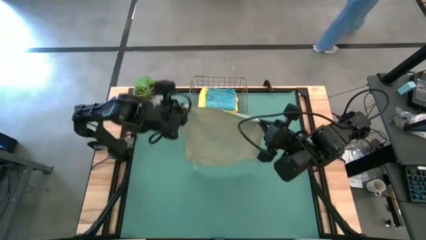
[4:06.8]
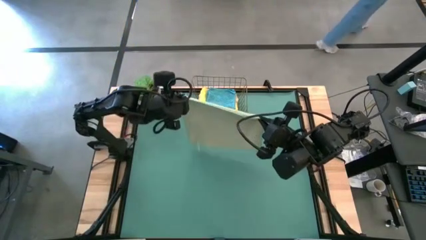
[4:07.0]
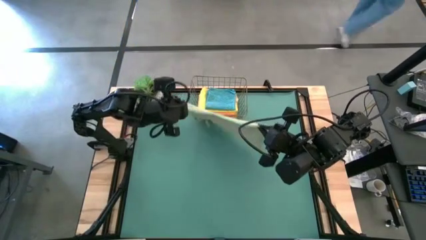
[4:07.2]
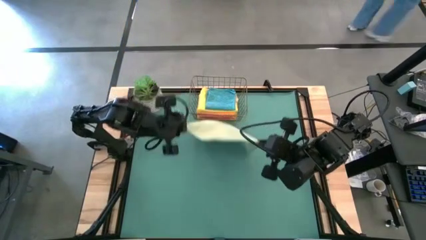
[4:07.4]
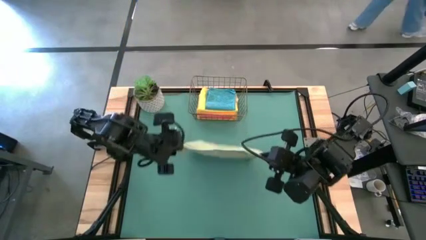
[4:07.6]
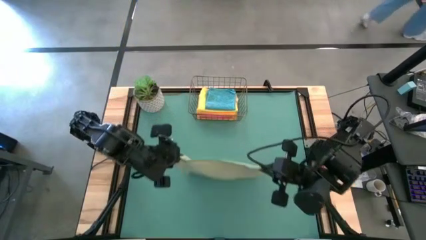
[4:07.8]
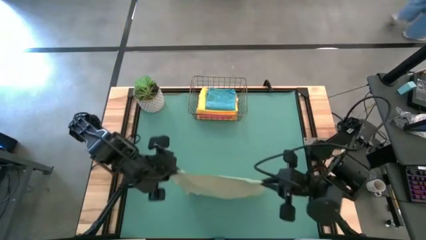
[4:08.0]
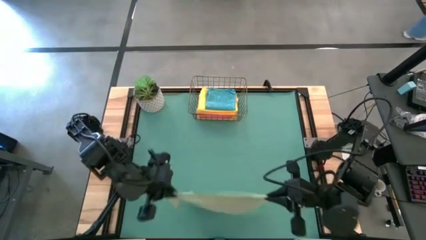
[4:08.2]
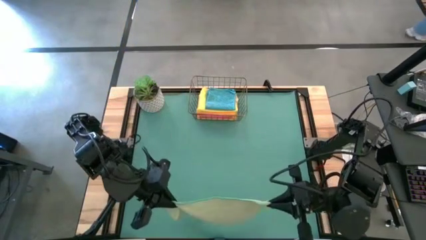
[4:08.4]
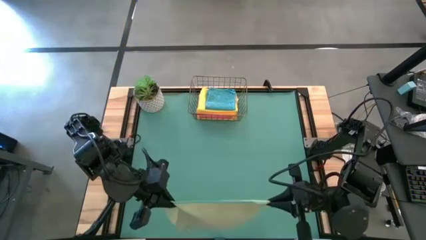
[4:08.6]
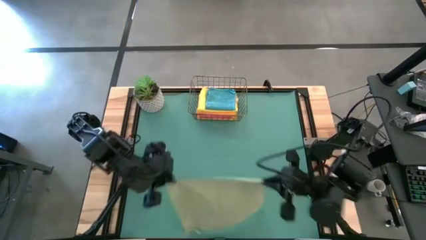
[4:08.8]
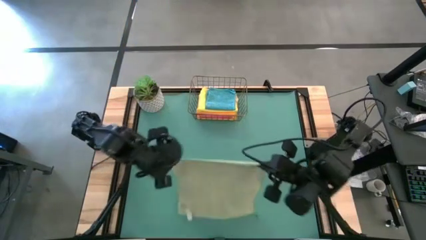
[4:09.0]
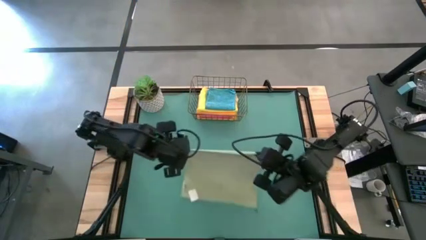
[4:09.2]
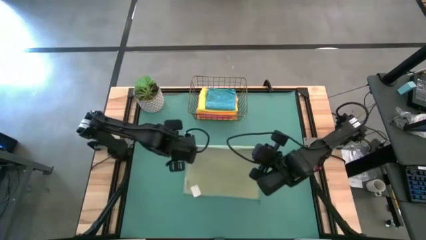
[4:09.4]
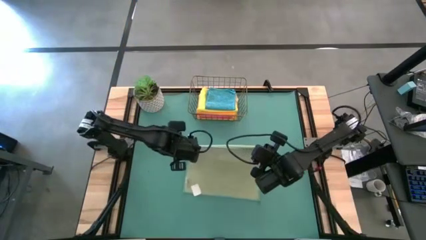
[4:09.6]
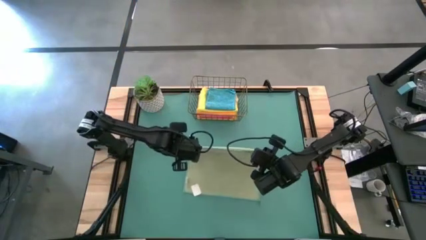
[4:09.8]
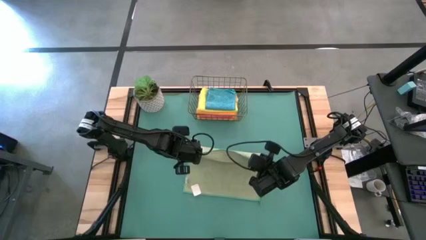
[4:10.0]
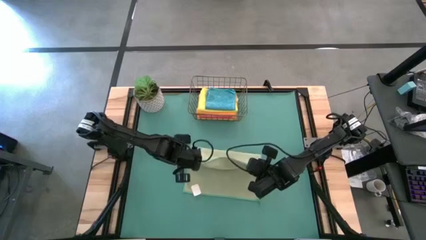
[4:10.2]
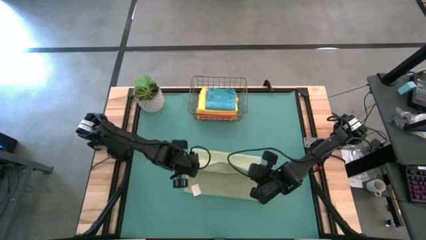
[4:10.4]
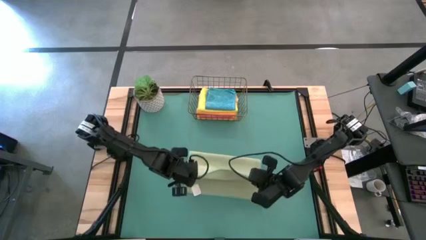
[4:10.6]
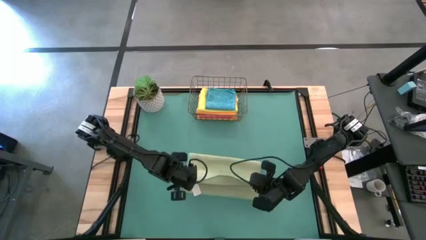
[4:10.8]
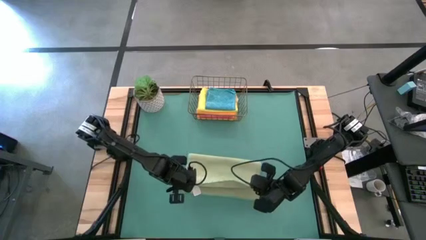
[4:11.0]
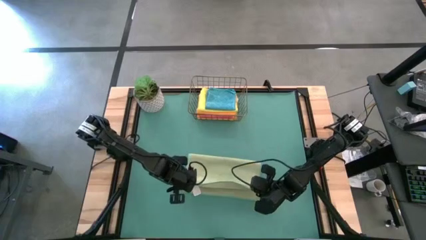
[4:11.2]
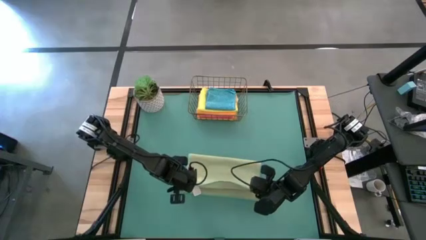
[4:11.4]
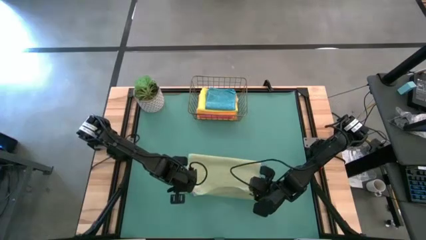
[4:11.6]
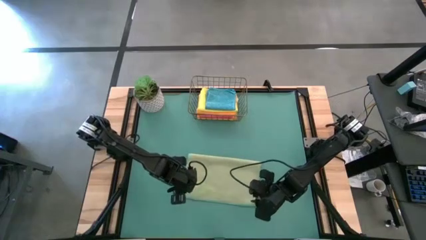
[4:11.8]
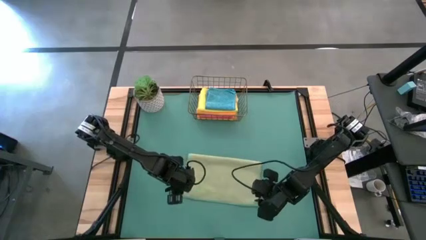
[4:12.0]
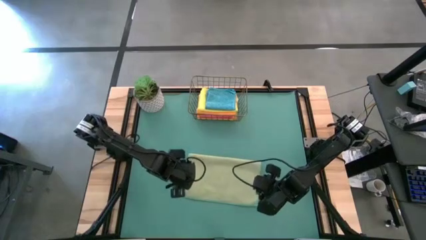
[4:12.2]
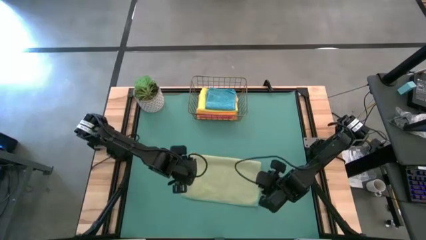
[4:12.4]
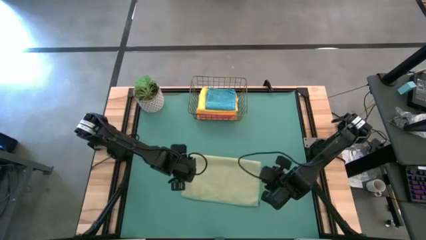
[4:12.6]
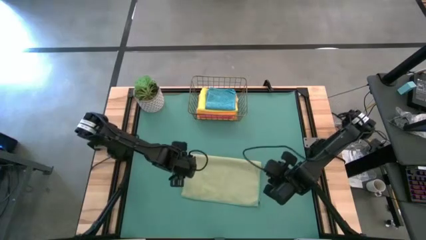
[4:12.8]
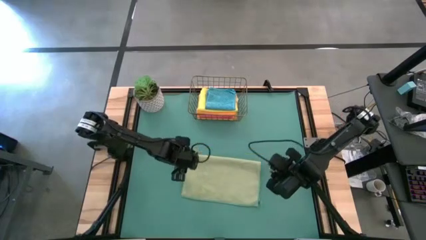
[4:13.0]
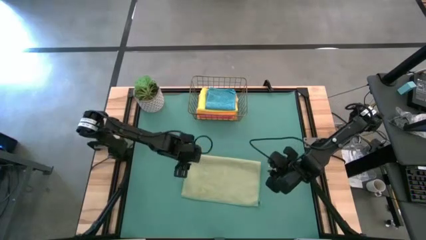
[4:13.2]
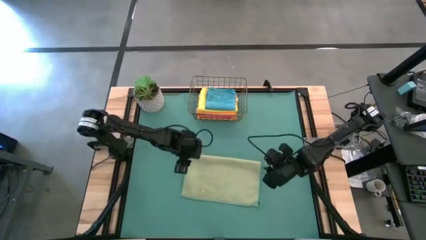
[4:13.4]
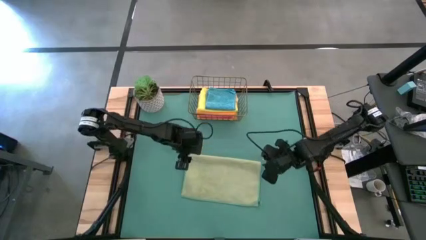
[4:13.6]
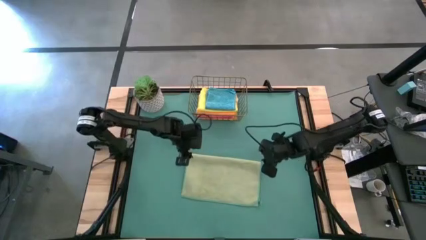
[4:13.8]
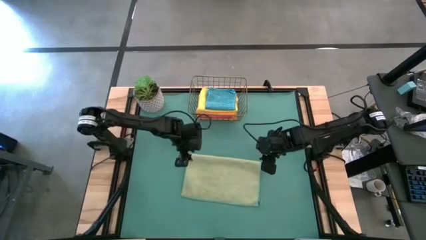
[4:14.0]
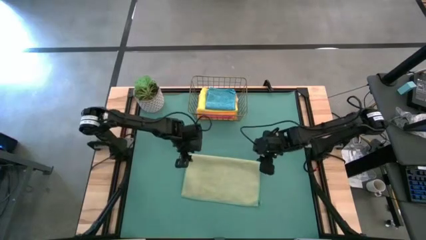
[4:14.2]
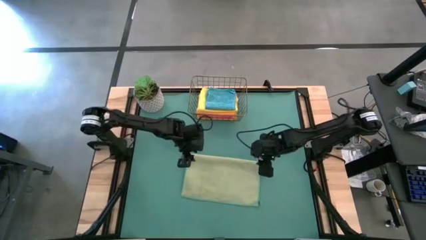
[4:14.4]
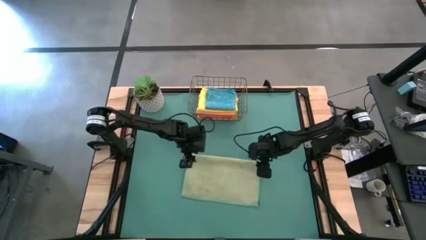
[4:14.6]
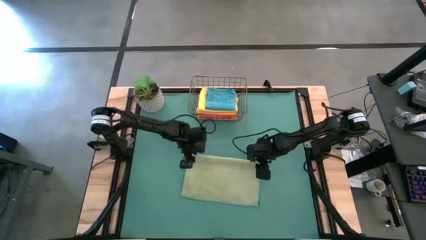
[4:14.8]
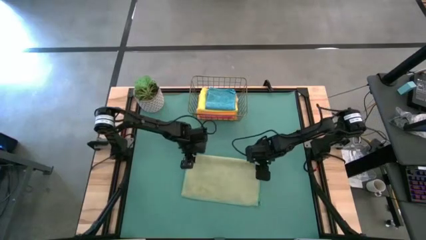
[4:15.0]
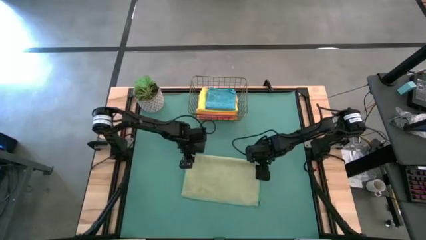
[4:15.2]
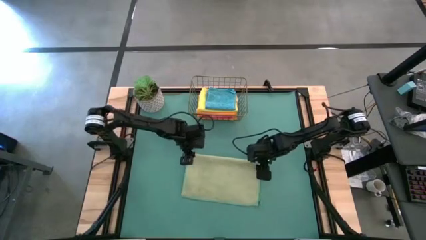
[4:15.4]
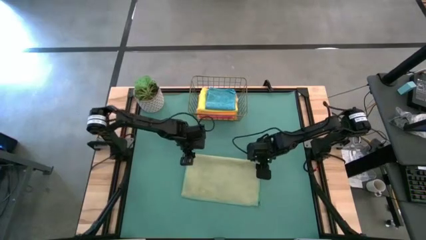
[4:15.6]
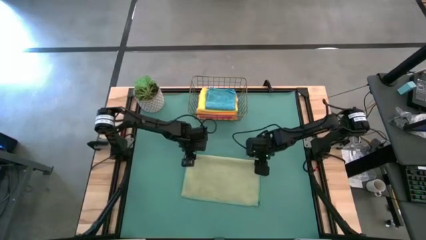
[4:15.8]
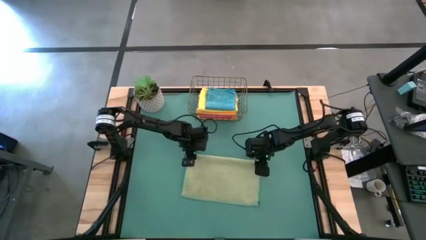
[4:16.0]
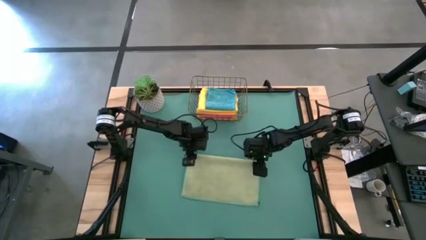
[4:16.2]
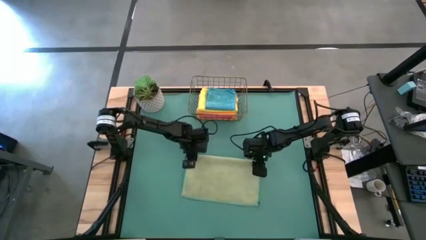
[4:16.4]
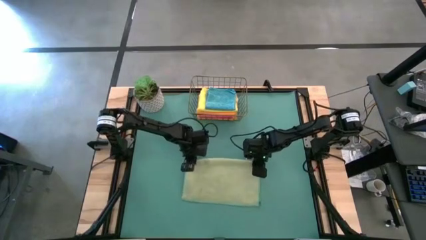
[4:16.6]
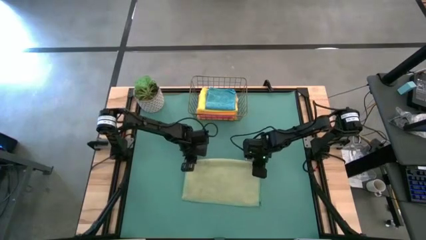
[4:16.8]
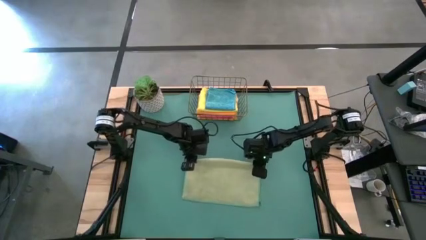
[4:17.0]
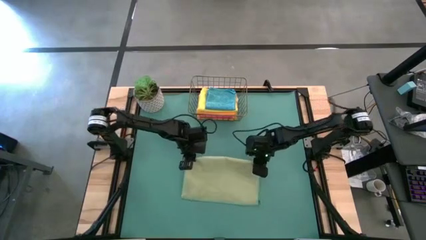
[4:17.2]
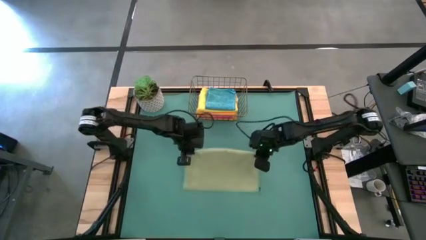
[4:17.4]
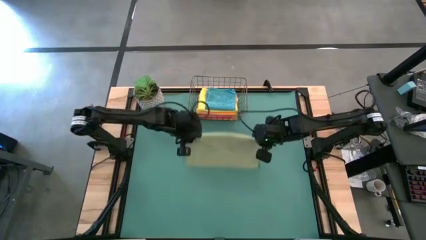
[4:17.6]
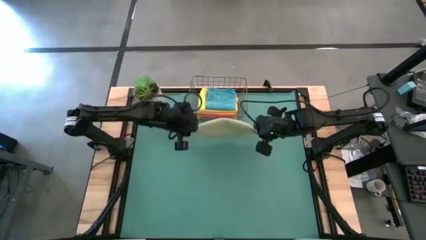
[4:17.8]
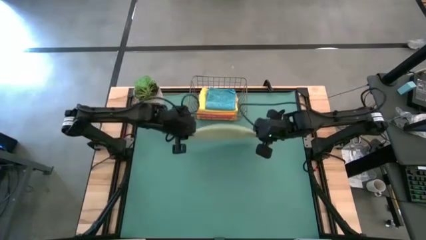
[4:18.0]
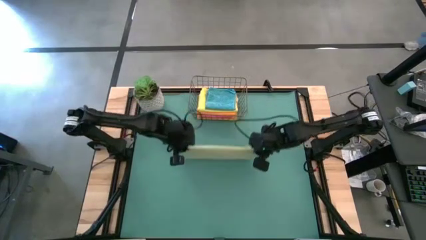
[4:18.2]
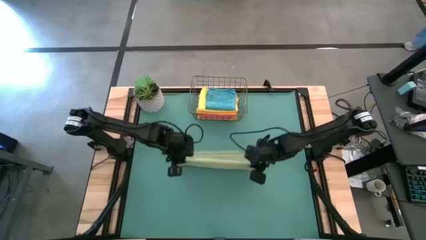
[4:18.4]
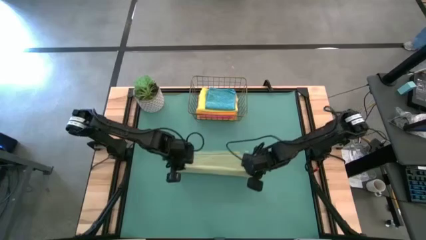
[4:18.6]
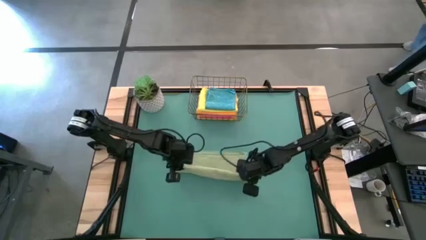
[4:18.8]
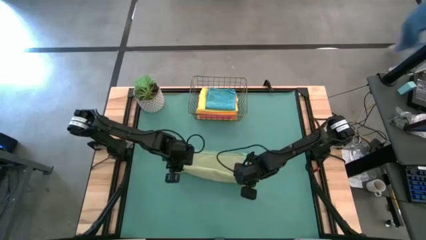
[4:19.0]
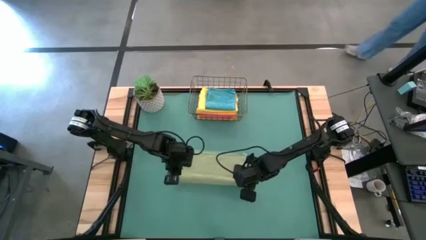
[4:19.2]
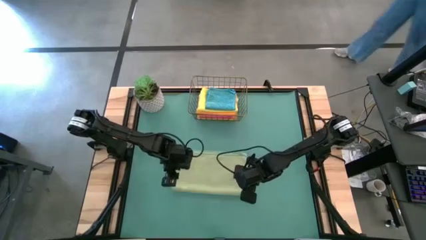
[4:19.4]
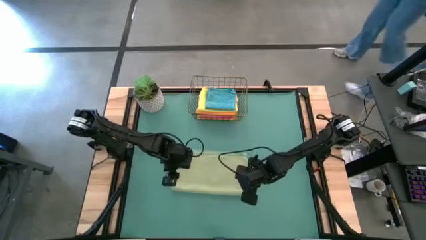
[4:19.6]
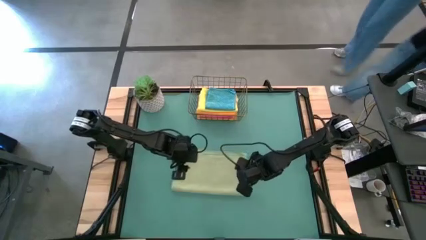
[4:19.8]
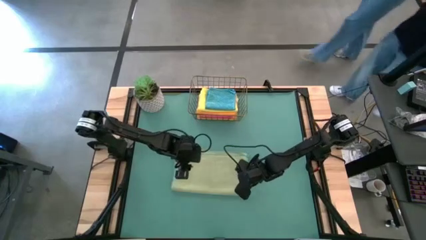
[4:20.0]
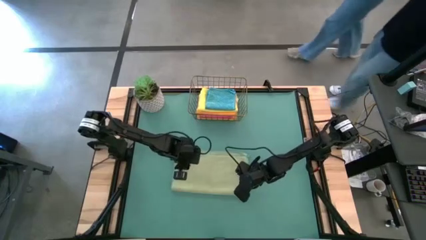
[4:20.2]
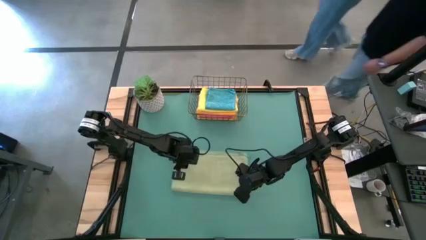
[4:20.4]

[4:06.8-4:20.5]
Task: Fold microfiber towels
Fold the green microfiber towel

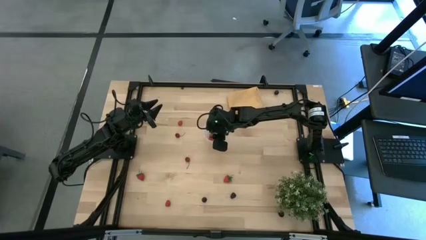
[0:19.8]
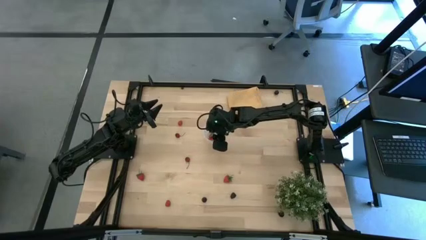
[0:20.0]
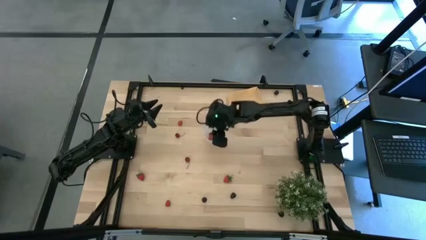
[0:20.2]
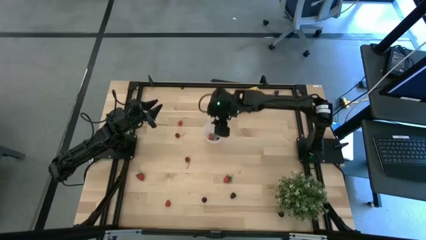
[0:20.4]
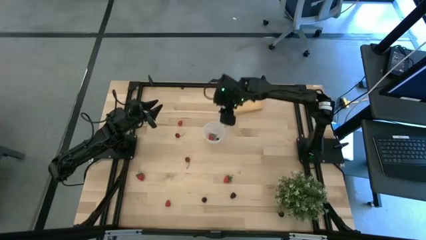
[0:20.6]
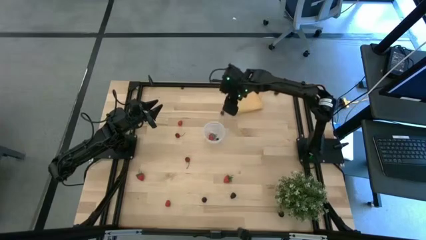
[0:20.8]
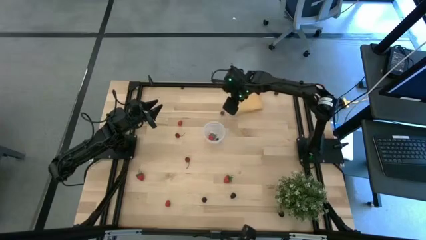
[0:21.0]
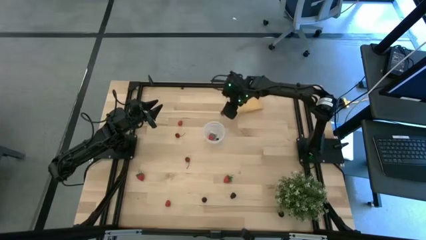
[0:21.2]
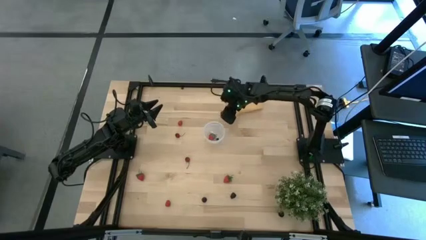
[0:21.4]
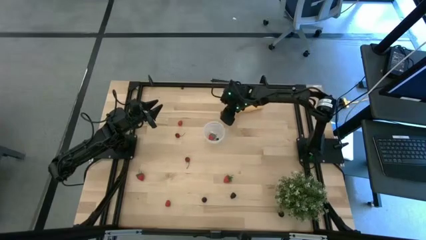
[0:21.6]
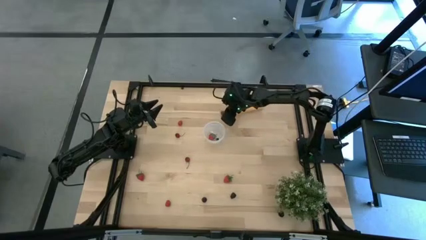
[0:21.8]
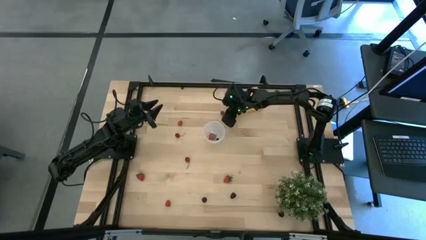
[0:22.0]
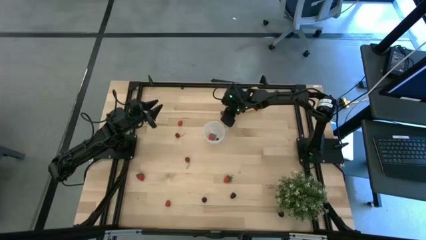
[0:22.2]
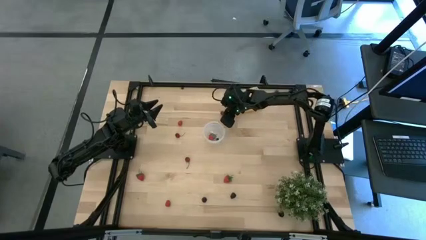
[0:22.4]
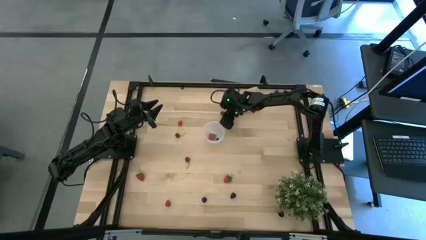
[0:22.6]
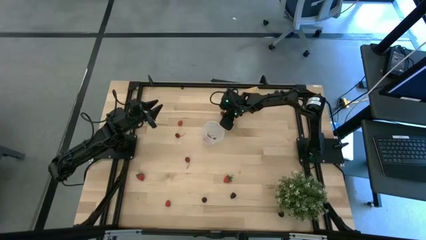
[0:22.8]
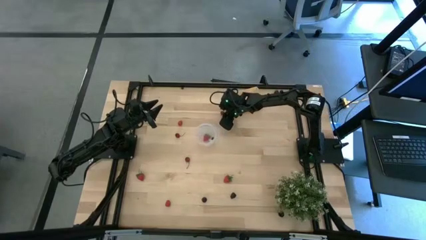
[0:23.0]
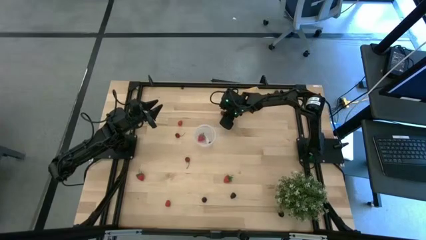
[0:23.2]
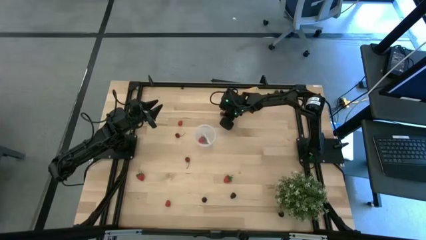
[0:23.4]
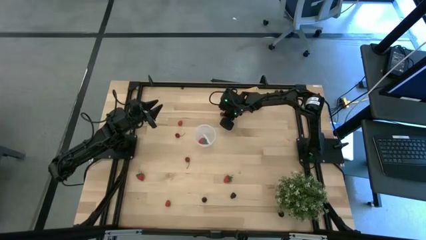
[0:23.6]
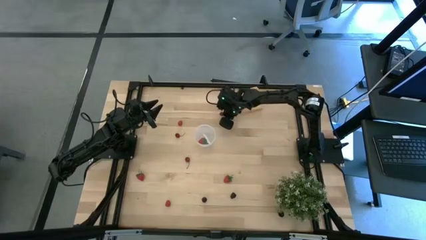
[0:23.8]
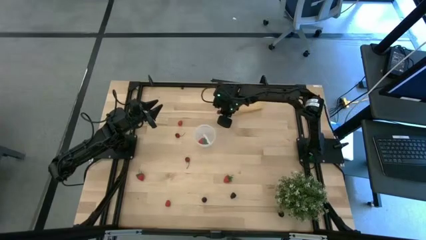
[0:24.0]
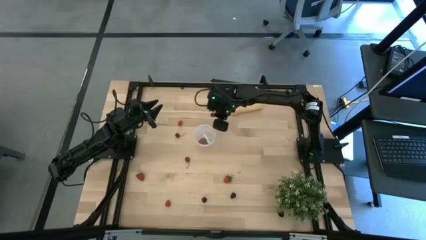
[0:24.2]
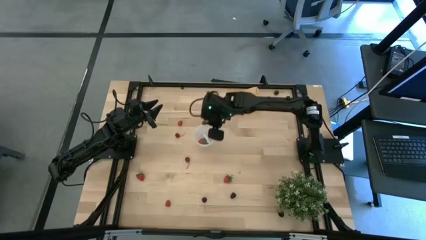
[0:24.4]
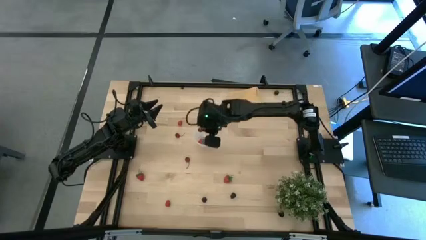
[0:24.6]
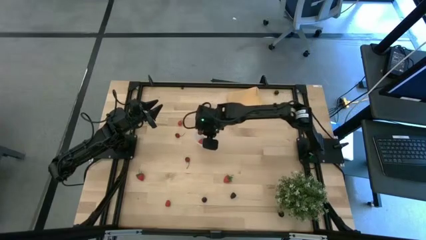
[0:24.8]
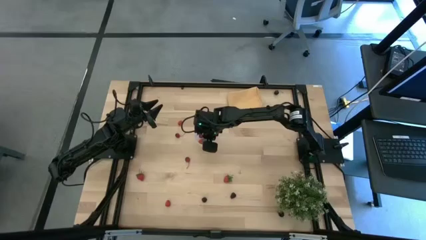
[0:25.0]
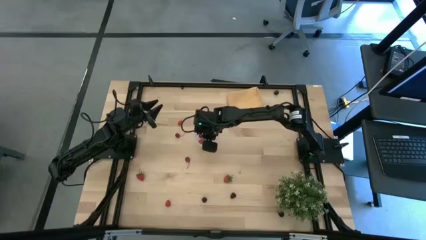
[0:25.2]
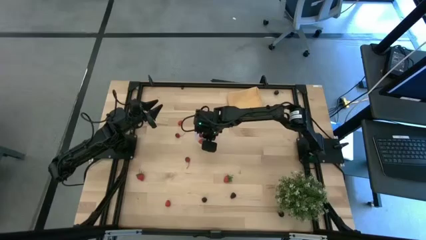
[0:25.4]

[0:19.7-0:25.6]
Task: Pick and placing Produce into tupperware
Put the top red cherry into the transparent container
